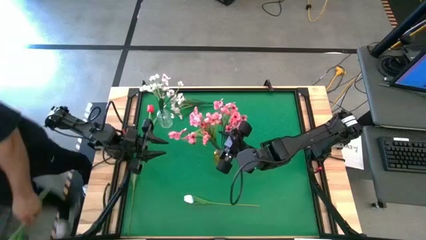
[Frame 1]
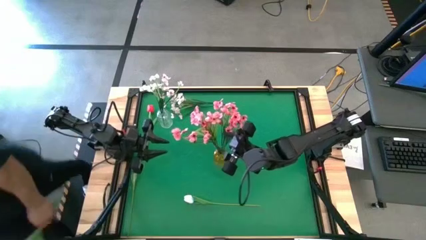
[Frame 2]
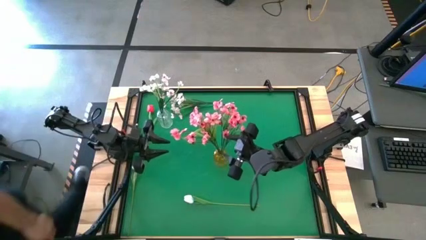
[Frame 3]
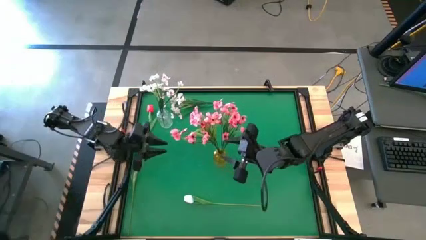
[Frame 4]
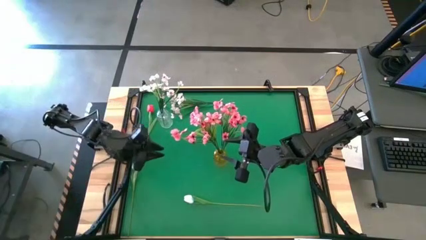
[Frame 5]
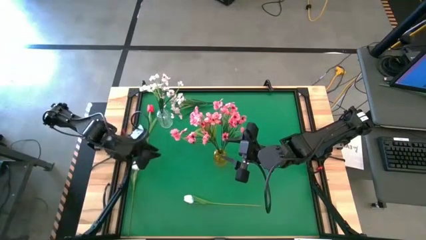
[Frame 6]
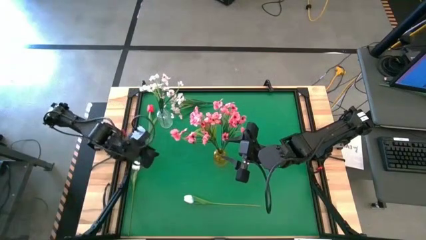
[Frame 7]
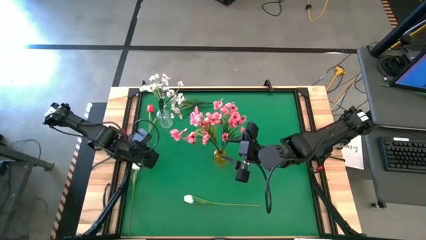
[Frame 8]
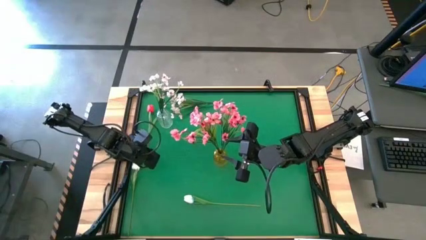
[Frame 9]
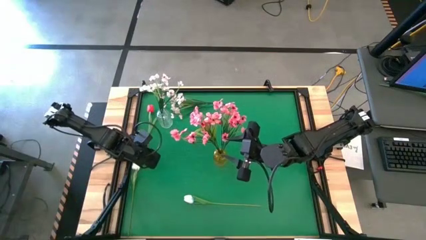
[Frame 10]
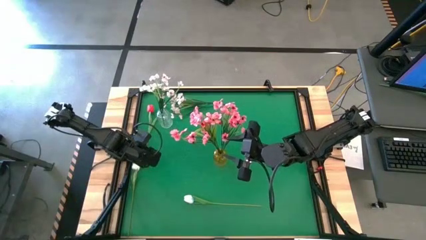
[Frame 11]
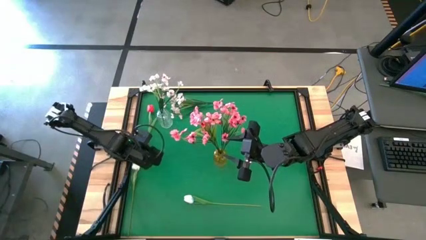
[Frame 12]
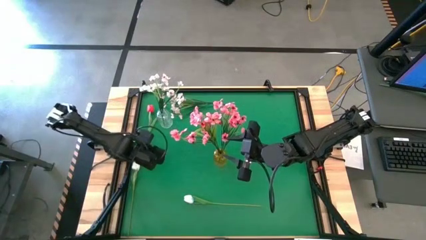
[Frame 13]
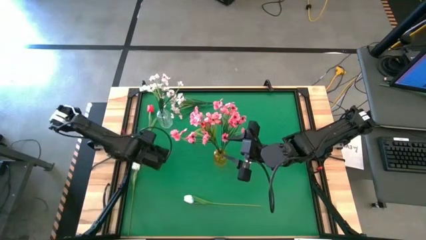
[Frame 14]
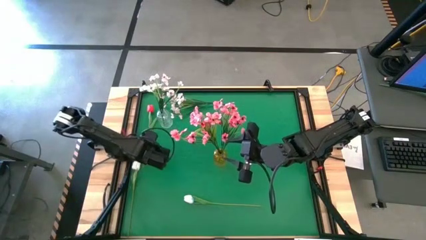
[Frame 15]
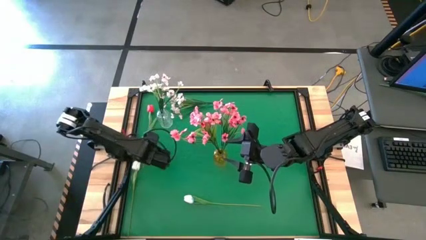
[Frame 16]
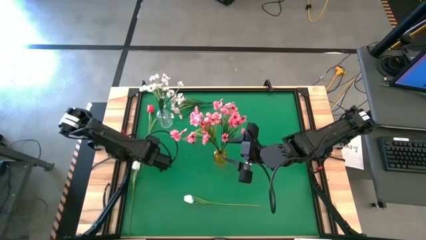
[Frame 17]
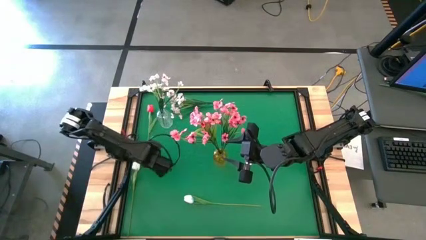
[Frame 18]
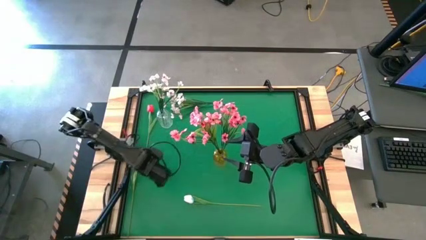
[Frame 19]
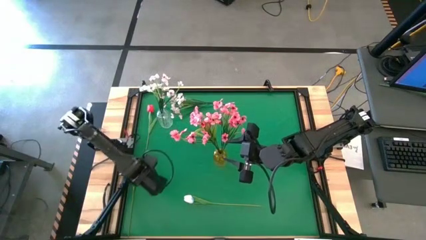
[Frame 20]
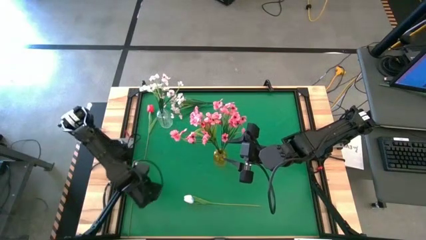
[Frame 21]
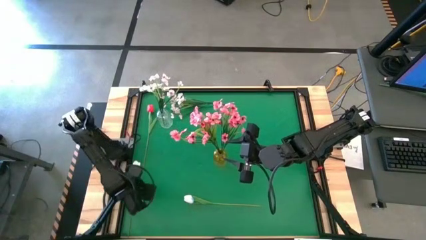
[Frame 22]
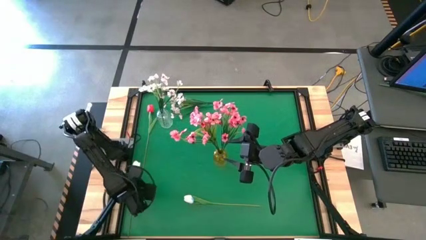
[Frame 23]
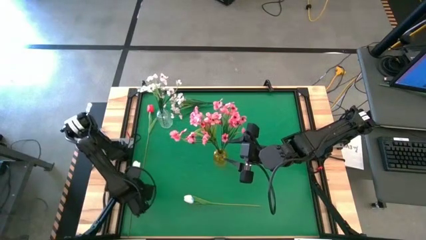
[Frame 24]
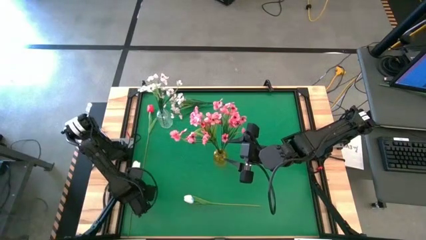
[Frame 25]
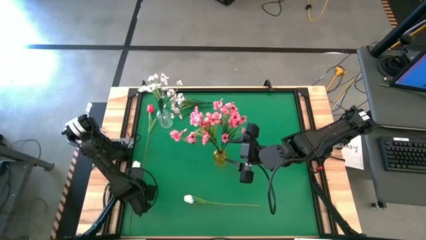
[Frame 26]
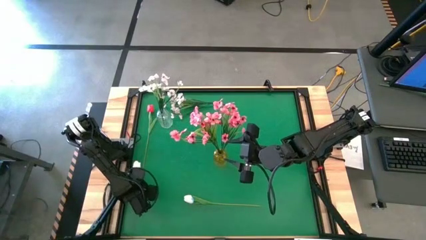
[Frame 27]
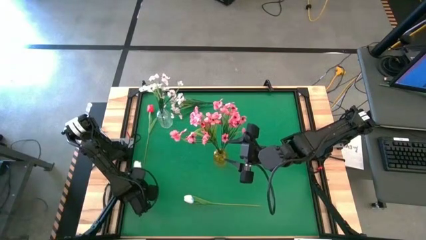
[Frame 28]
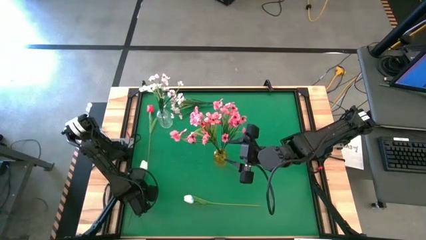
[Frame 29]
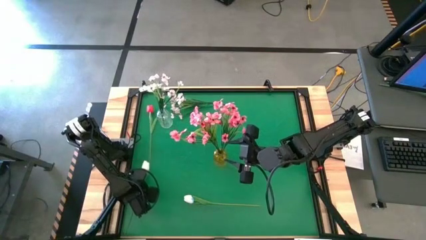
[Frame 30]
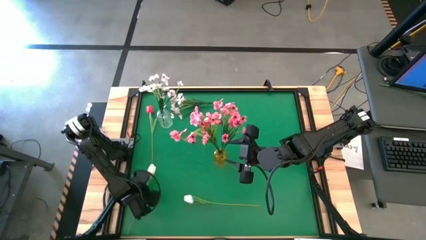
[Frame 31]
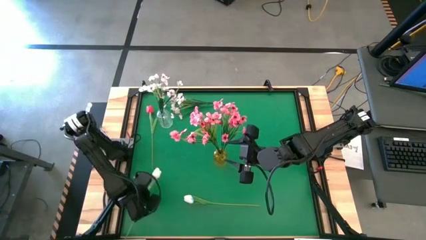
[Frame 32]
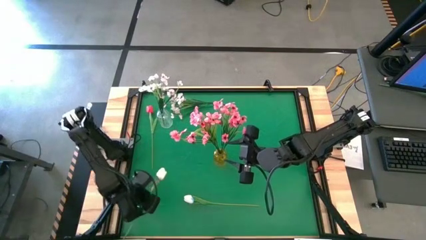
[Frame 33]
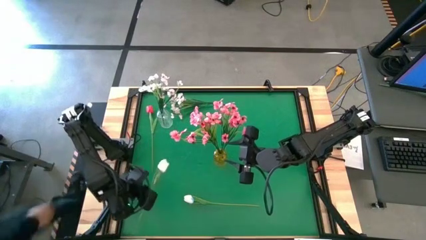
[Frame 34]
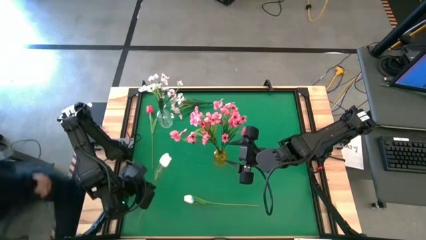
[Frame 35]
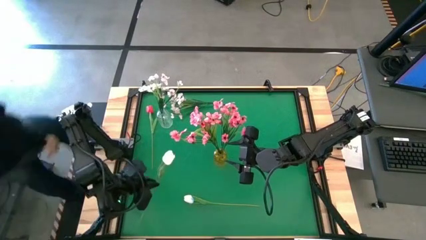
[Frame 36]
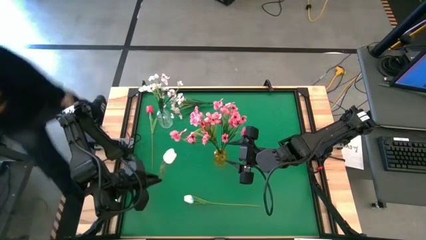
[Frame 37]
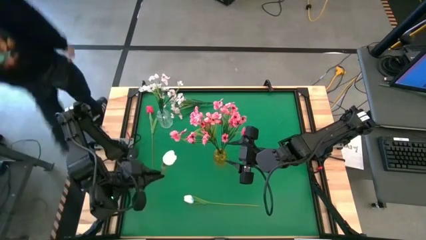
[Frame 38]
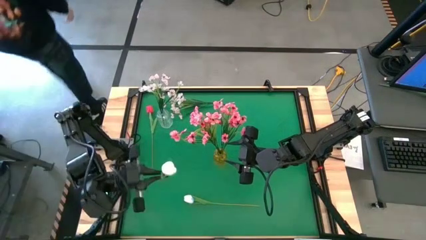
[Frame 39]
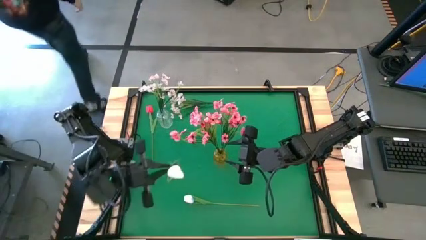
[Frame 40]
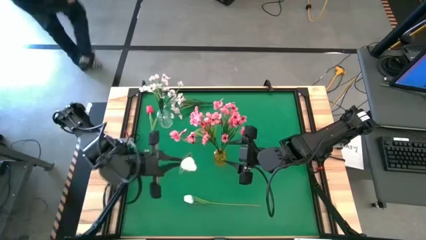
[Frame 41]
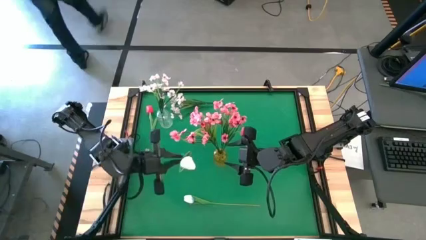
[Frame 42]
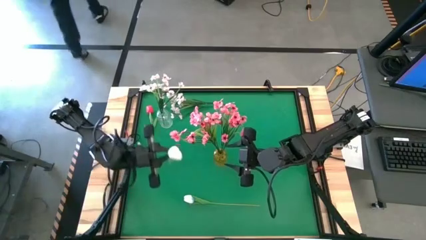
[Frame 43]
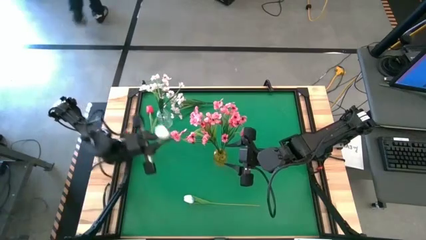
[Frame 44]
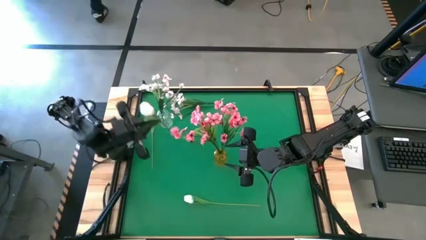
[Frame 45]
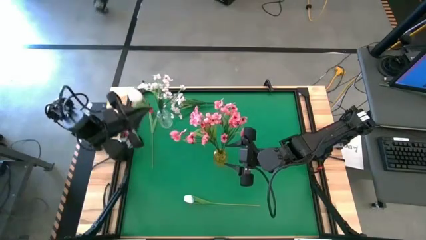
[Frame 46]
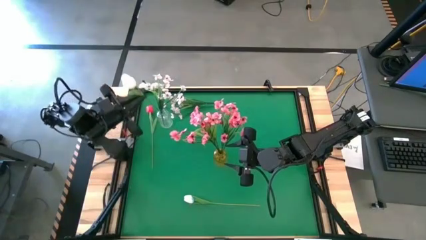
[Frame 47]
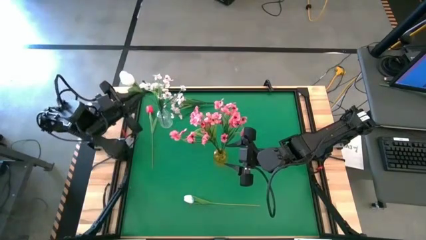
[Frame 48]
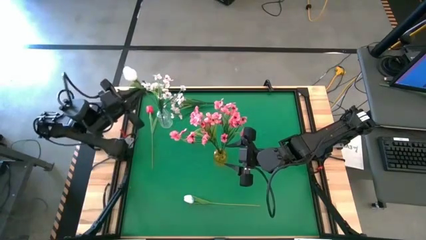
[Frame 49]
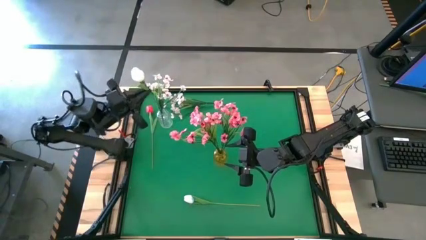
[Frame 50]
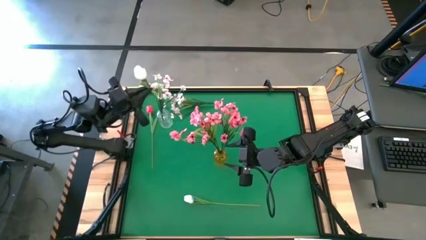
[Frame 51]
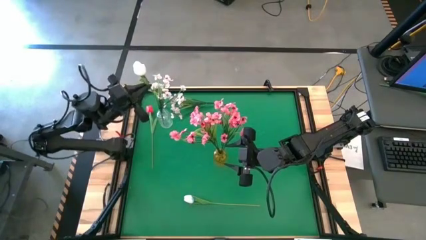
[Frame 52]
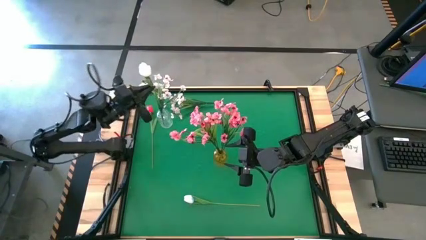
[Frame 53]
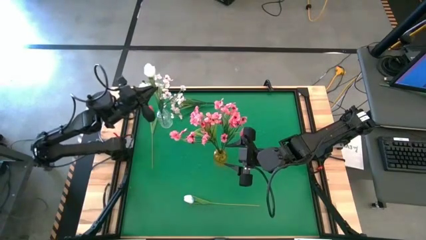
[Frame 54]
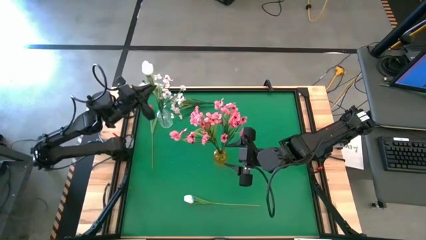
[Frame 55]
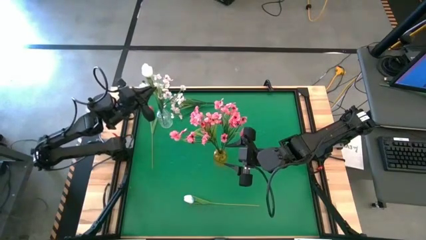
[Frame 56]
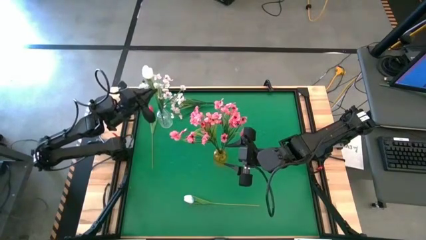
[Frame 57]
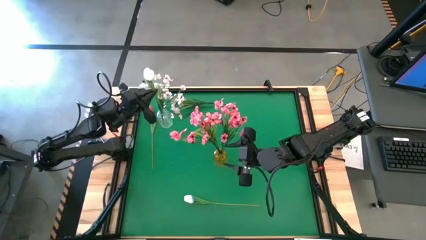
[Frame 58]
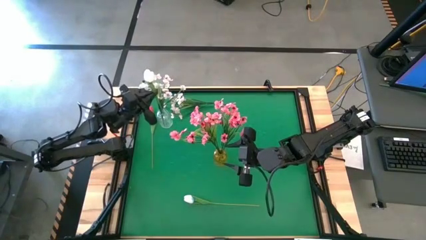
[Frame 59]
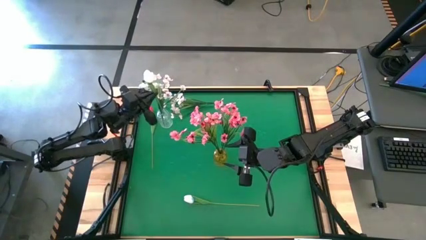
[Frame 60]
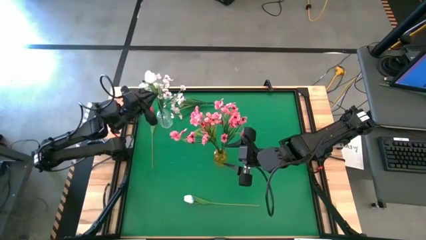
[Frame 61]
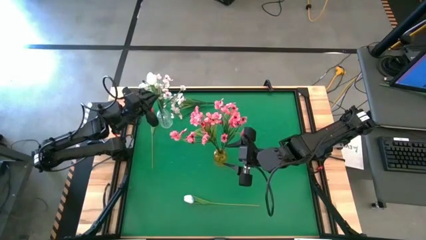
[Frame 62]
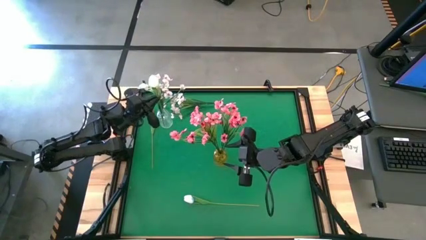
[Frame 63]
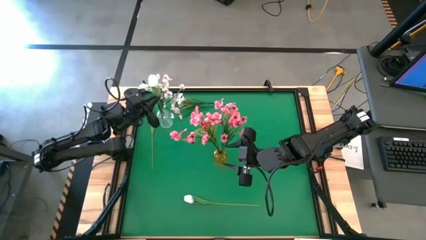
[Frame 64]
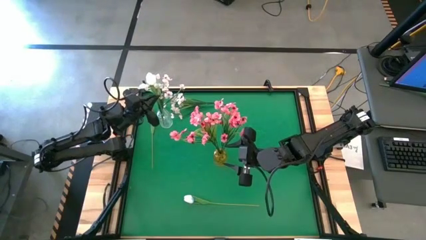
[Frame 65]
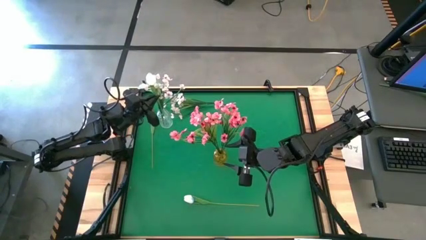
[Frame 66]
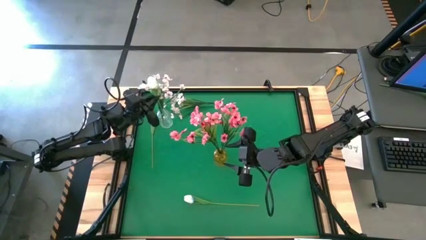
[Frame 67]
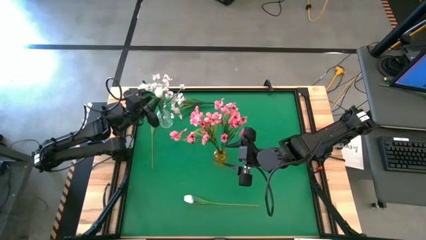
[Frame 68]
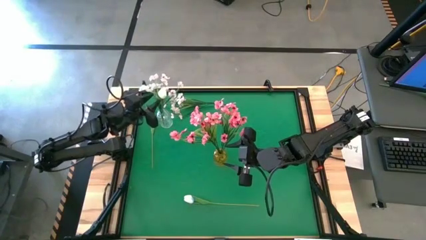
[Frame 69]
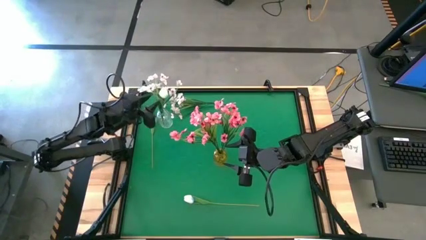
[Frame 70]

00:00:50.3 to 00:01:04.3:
Task: Sort flowers into vase by color
Put the left white tulip into the transparent vase

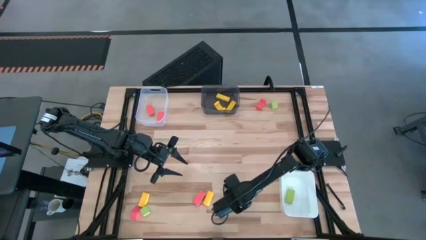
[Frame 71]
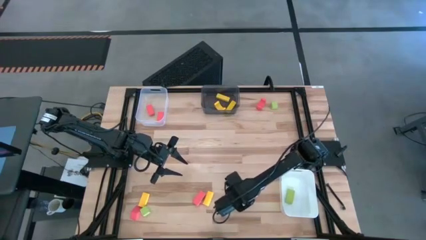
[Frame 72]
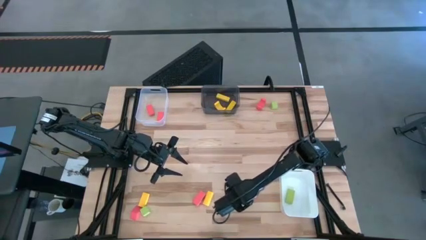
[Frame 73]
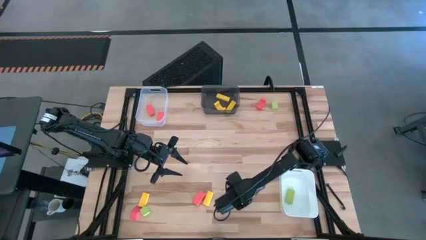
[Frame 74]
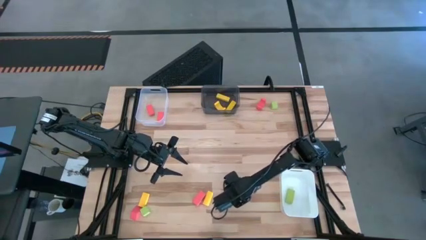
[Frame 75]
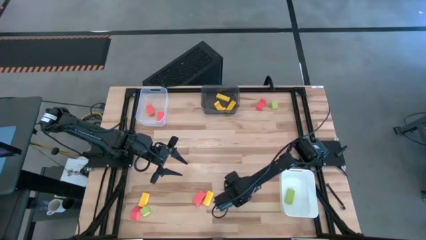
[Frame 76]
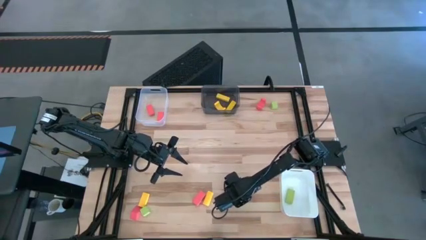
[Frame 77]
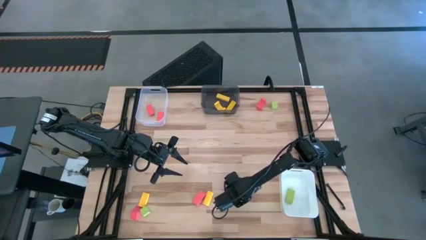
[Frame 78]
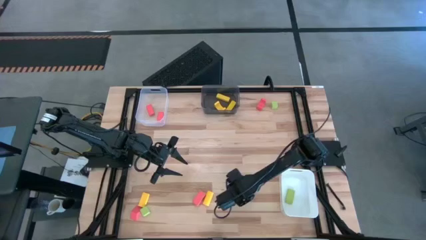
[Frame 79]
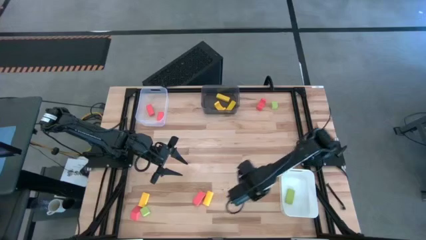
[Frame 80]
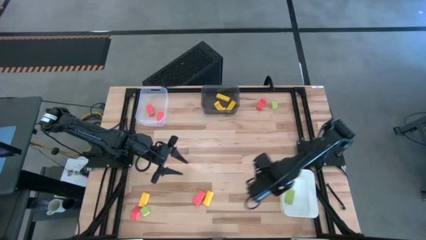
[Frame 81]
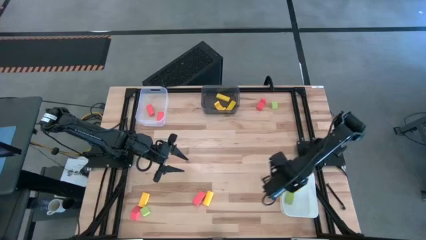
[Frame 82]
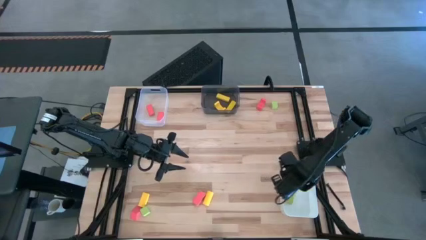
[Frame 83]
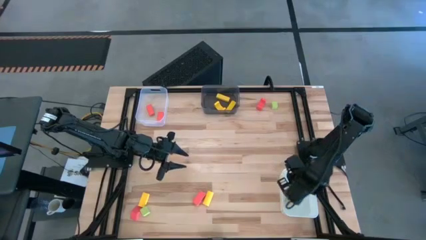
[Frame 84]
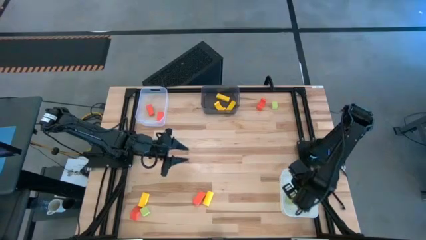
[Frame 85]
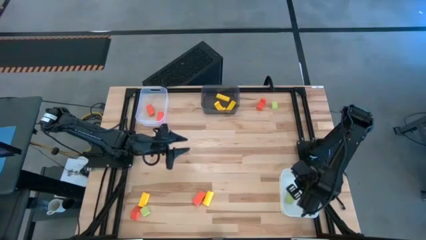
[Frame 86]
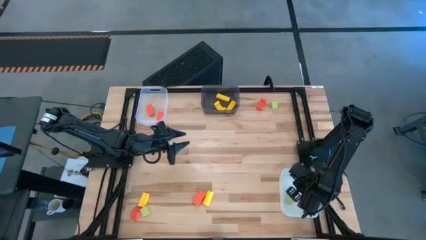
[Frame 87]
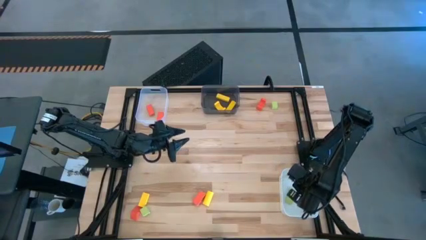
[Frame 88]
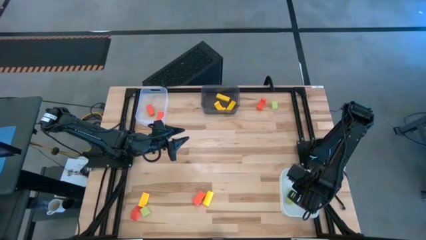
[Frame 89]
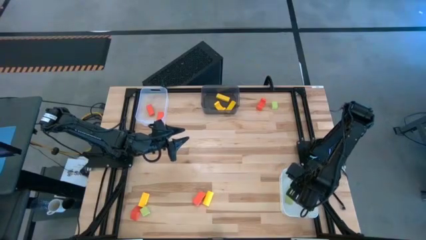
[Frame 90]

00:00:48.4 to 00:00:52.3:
Task: Sort & place blocks by color
Put the green block into the white bin
